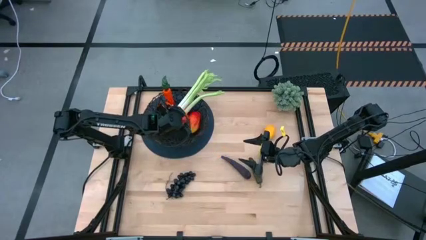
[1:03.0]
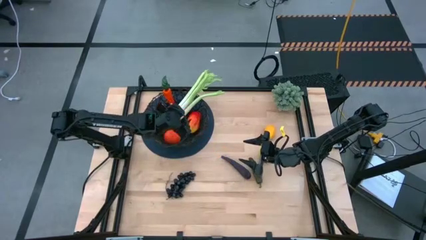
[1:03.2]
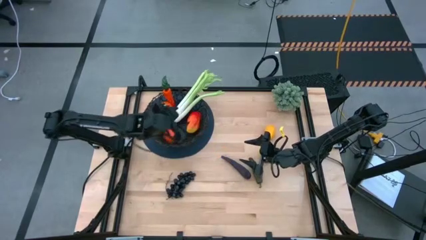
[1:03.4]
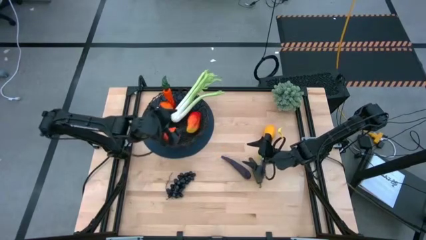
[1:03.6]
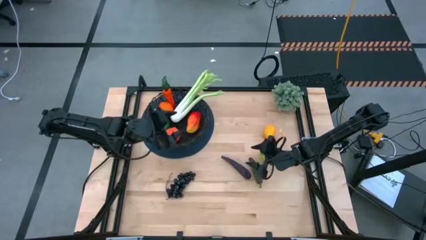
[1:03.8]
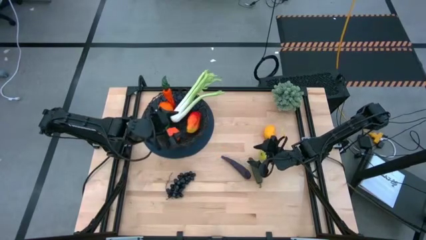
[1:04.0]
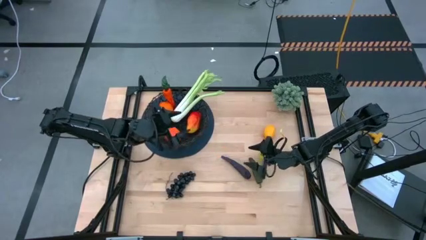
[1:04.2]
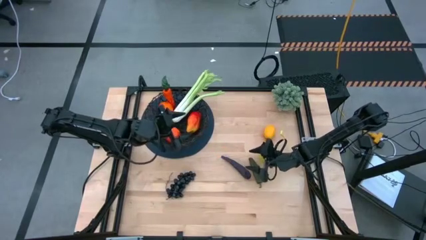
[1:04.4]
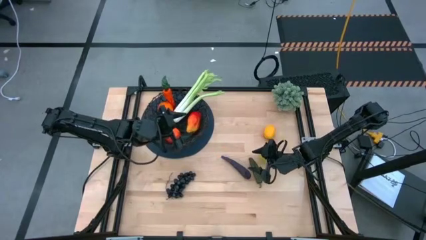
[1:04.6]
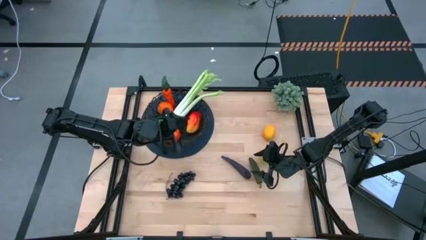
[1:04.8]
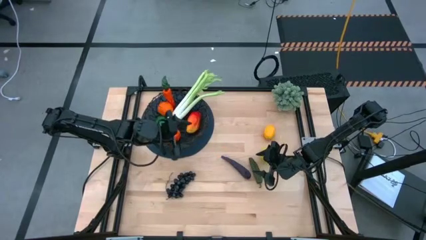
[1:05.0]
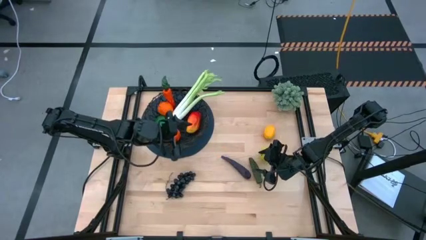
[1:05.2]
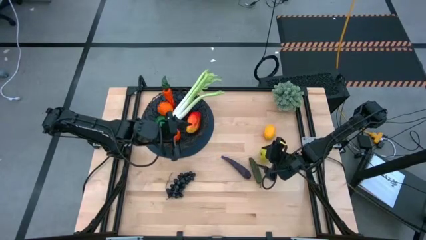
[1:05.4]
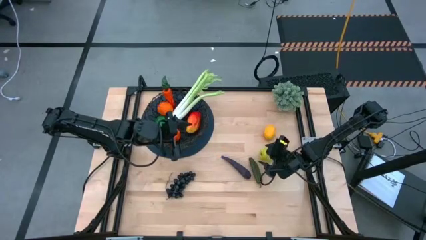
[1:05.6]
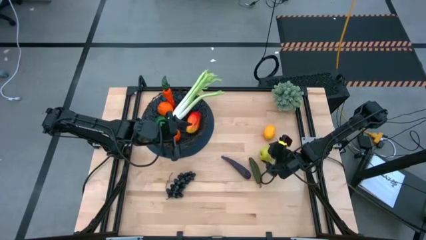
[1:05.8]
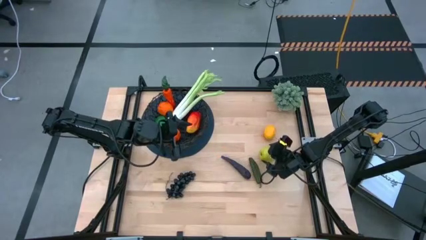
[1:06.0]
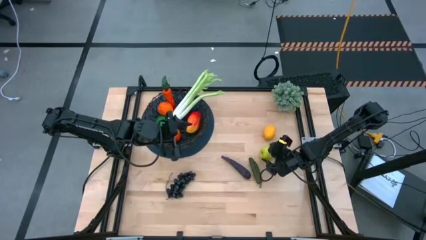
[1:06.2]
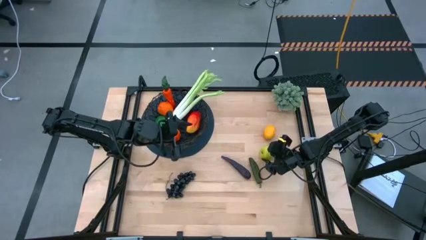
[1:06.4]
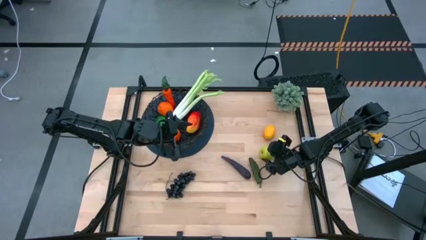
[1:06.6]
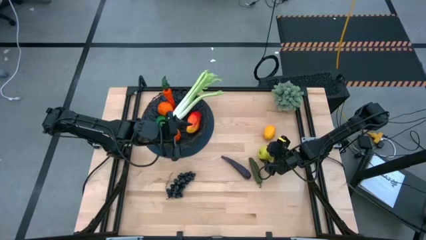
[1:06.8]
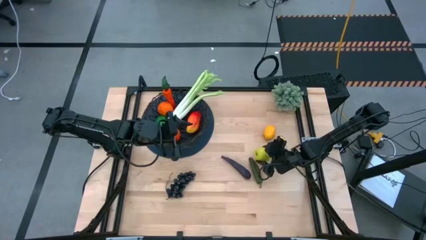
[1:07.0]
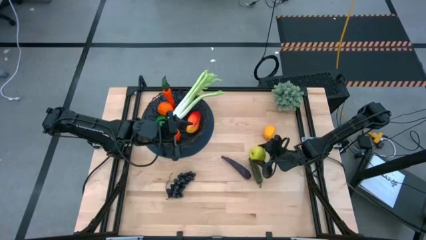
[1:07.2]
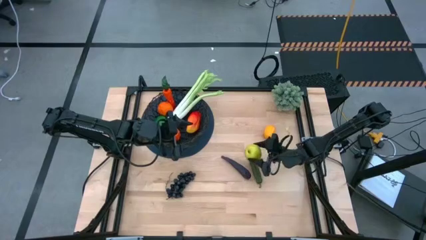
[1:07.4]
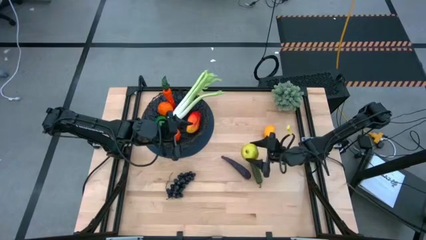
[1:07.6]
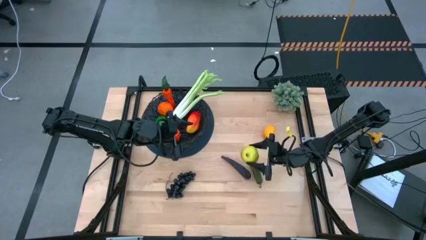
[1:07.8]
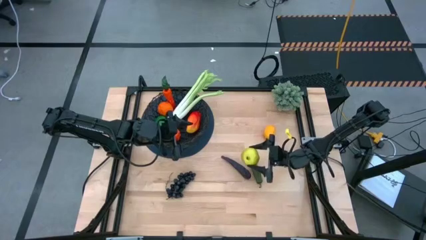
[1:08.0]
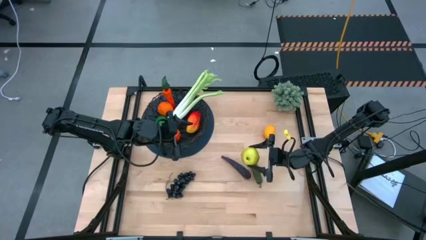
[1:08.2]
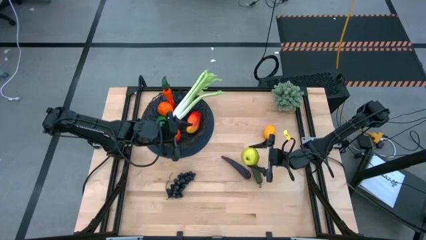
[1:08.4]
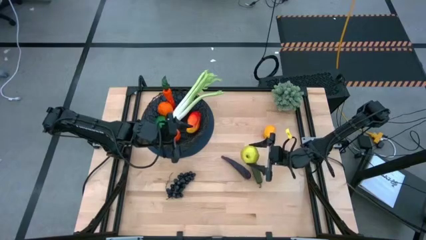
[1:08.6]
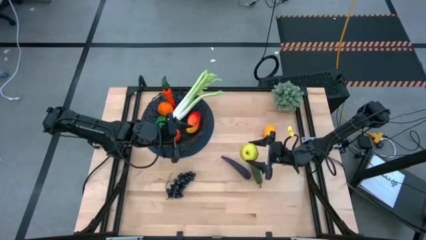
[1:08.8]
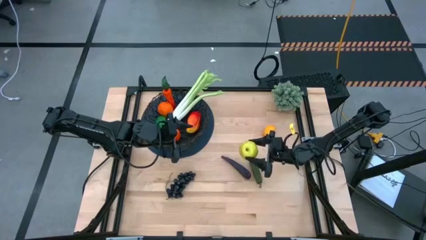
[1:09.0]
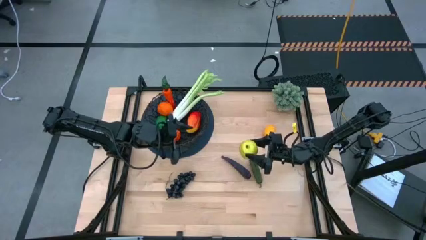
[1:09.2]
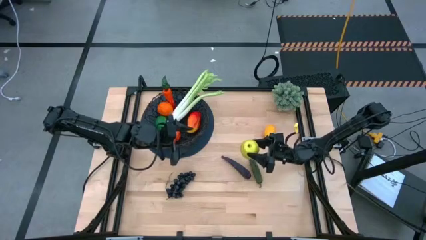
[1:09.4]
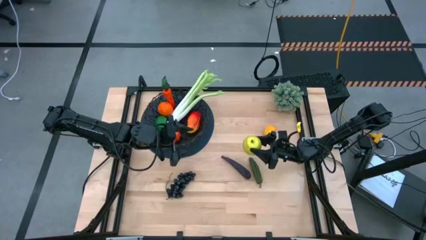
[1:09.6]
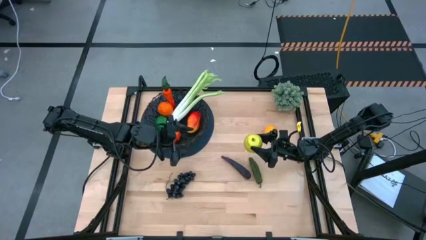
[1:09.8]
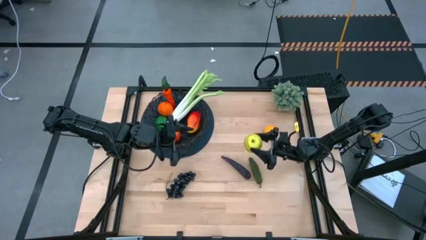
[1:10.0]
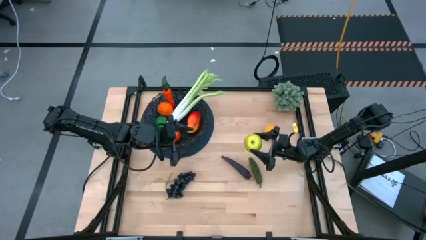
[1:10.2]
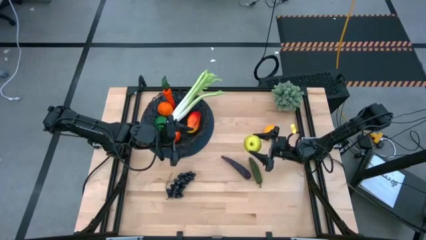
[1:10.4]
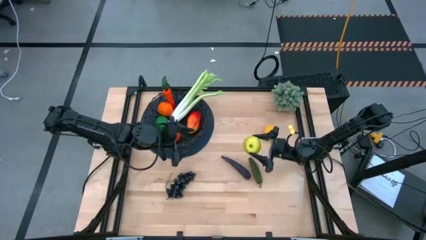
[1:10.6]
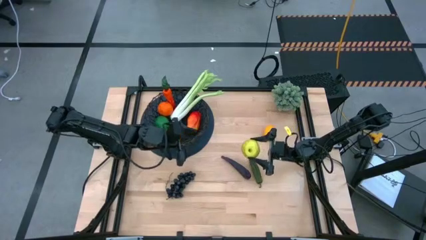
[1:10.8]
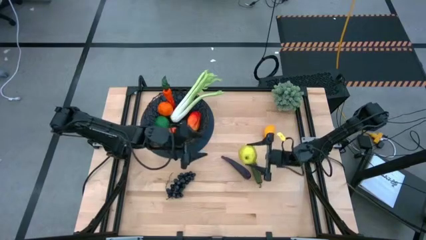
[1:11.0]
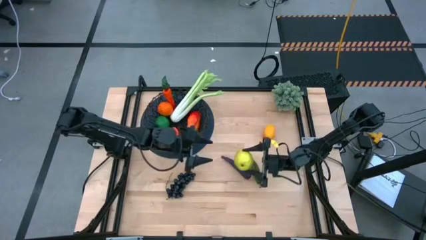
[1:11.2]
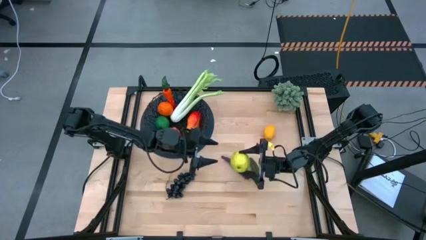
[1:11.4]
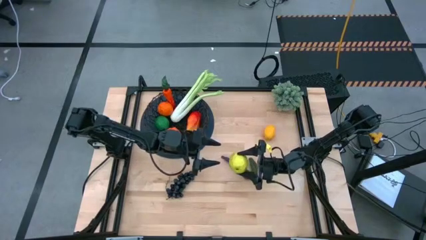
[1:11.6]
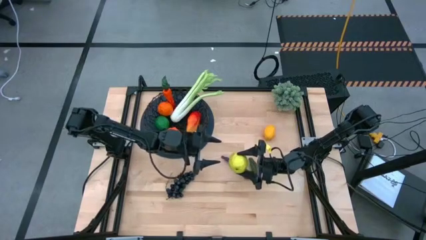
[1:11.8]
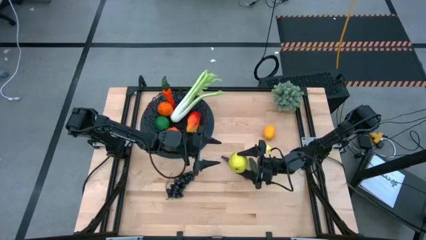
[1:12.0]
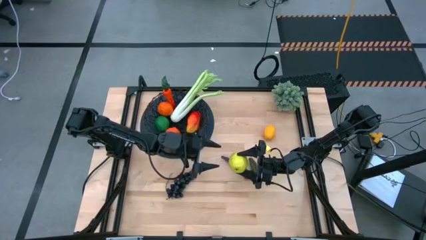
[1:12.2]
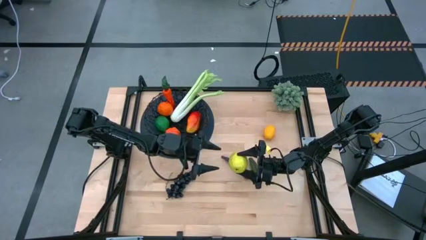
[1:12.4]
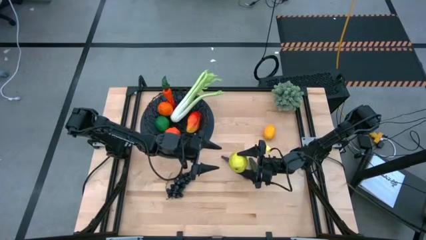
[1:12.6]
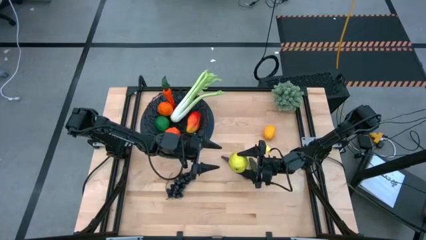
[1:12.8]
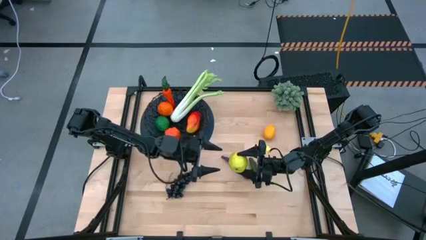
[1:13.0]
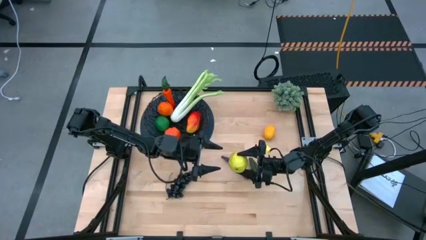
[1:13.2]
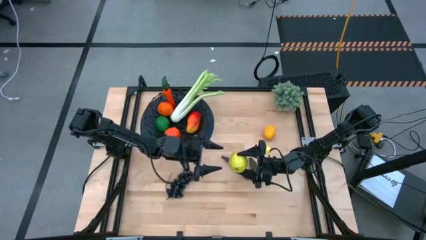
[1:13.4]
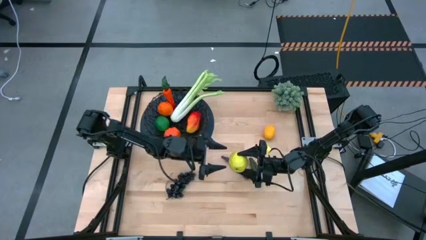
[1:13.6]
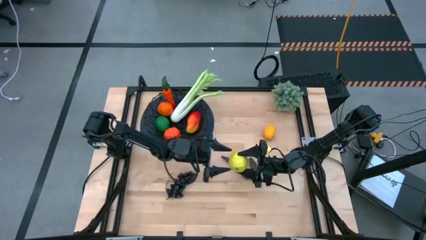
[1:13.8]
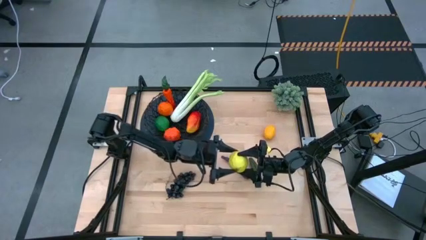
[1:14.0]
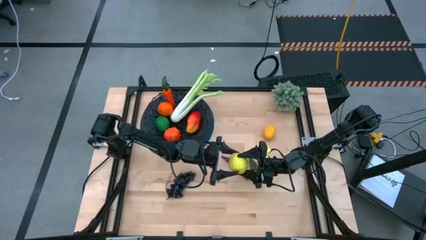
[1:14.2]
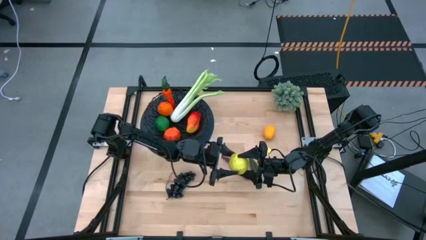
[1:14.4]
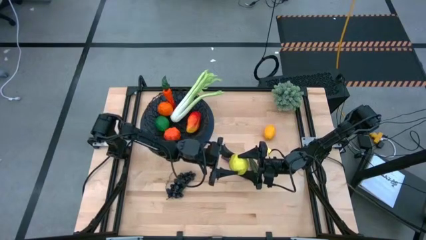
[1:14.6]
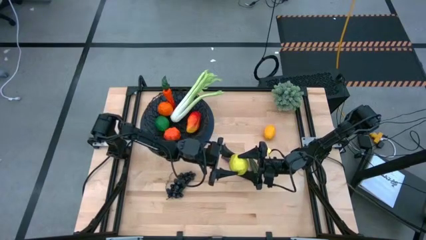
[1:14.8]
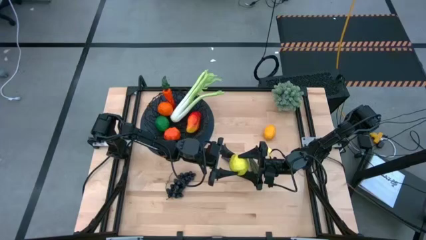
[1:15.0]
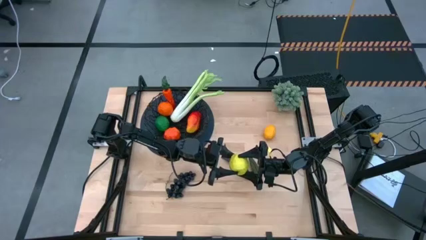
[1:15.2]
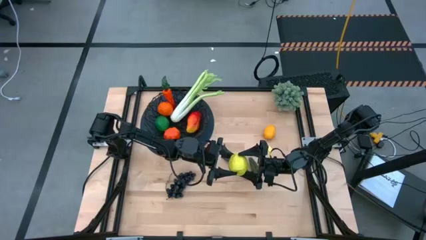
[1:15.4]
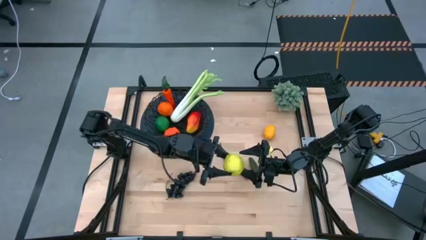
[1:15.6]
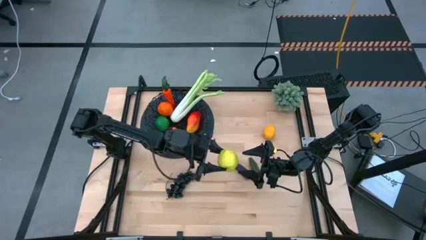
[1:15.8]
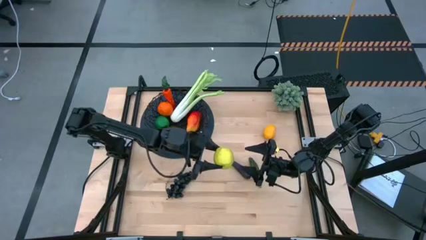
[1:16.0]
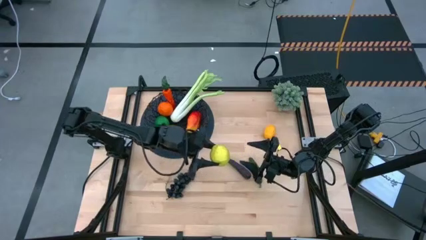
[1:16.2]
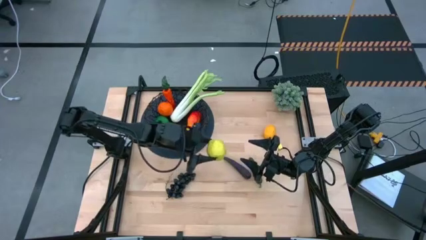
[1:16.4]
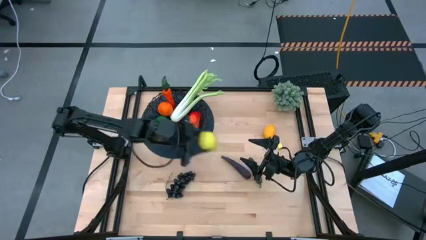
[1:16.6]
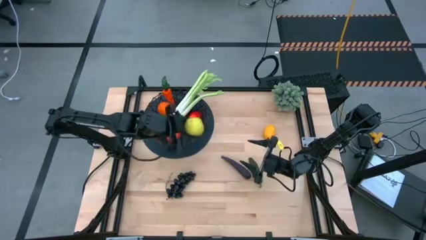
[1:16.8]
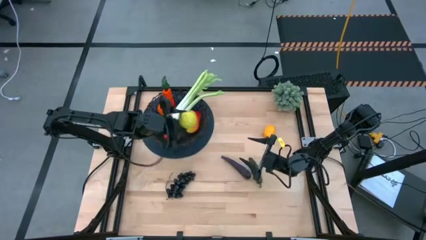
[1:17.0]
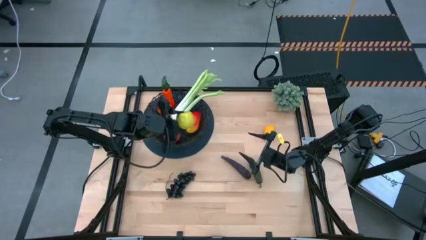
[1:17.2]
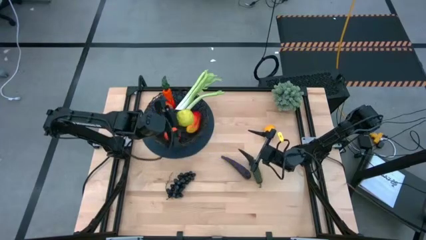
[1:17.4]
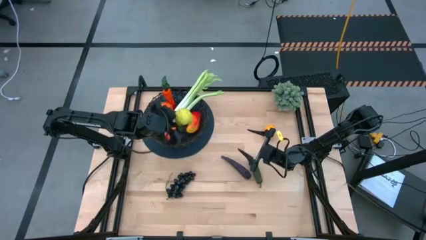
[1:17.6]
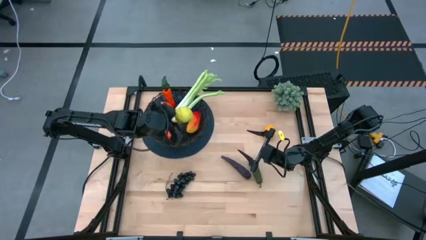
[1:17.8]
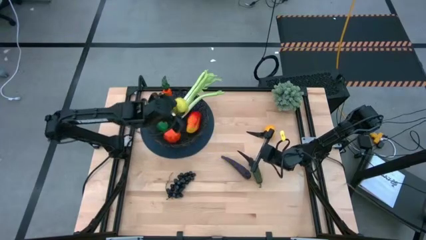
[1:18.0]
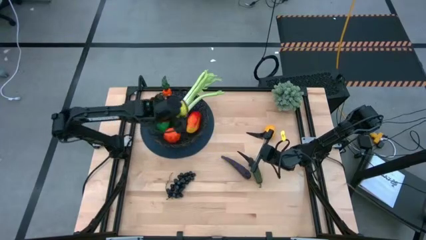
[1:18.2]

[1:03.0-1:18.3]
Task: Build produce basket
Put the green apple into the black basket

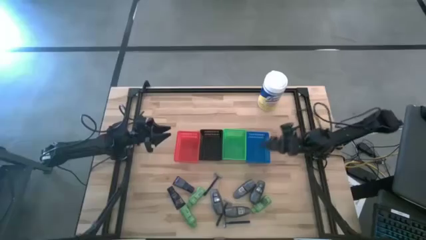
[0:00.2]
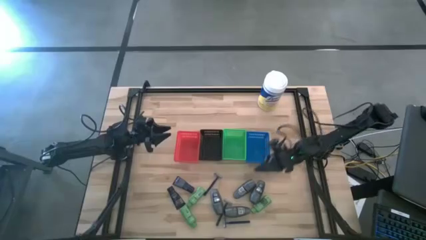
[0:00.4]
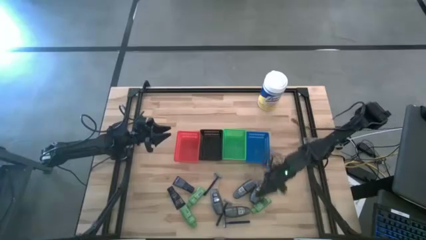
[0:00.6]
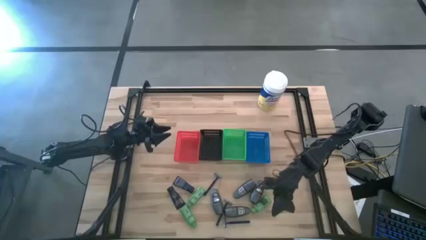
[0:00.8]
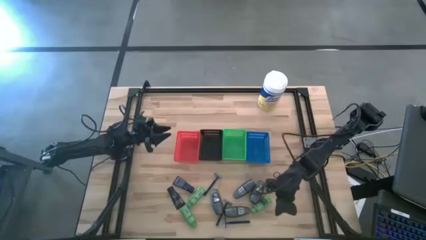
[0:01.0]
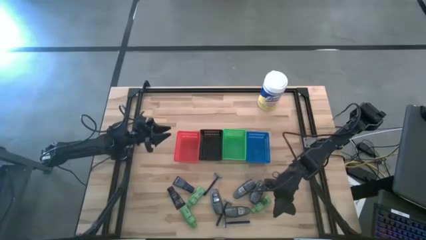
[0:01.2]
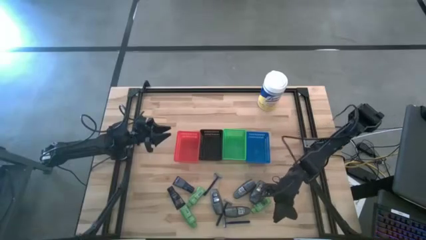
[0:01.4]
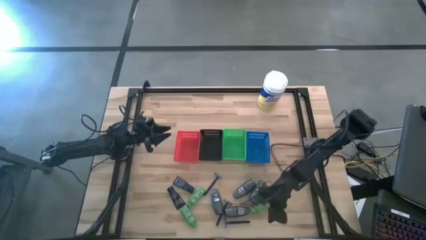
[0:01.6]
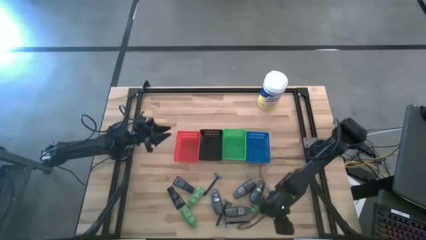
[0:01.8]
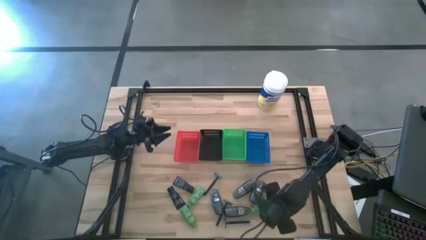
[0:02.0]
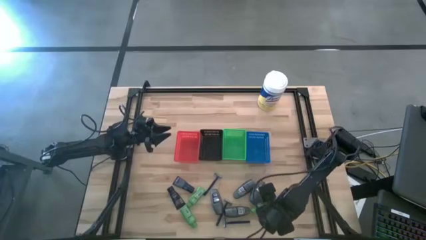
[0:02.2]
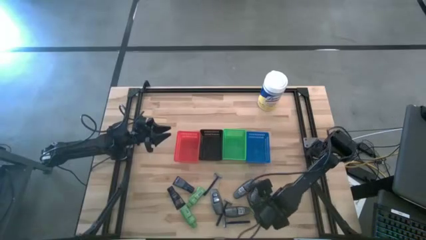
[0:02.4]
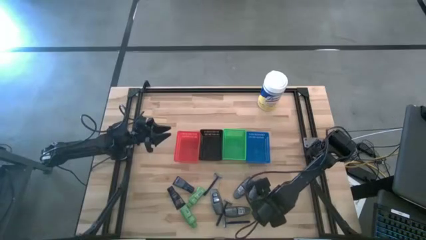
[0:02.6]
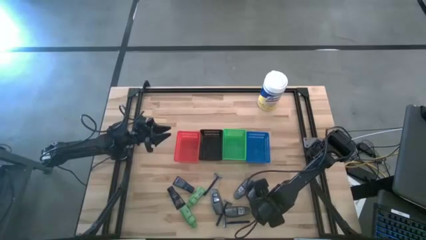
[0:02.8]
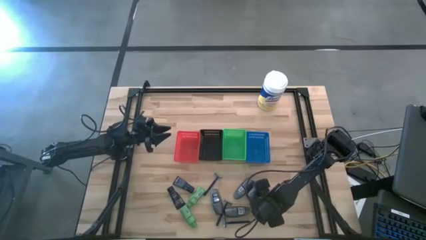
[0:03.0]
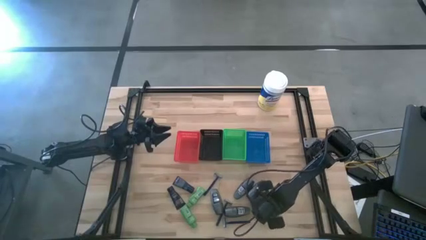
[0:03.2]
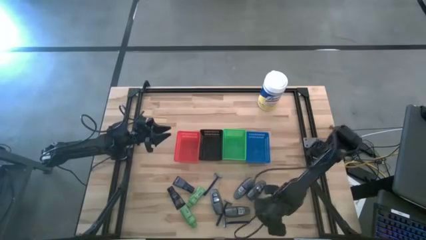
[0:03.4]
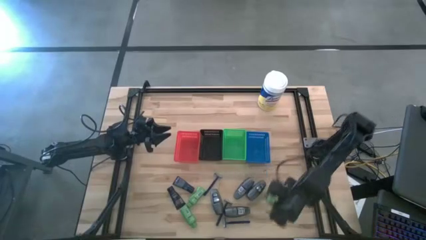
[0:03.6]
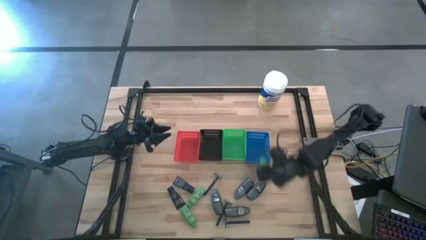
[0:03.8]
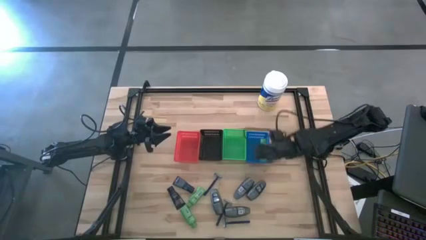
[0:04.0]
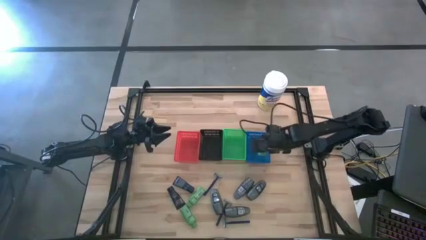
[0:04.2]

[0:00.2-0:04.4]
Task: Pick & Place Travel size toiletries
Put the green shampoo into the blue basket
